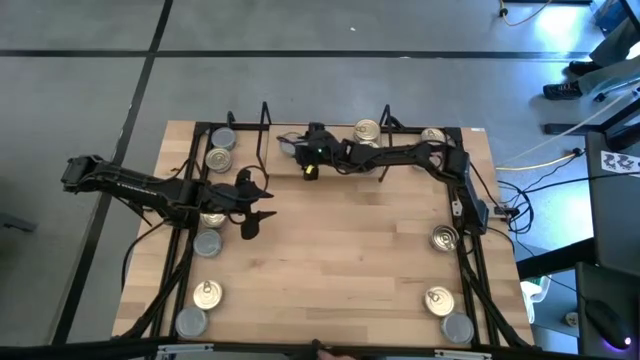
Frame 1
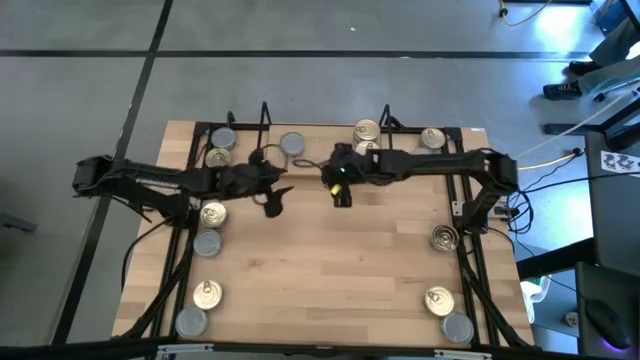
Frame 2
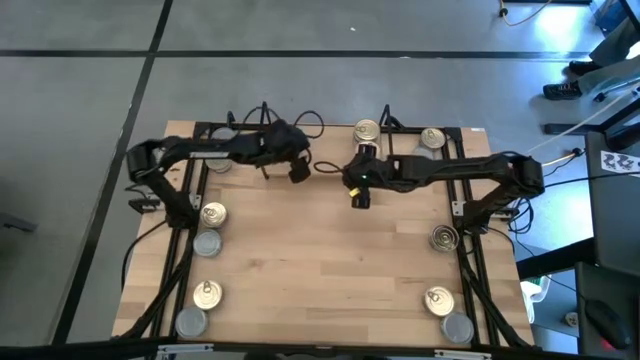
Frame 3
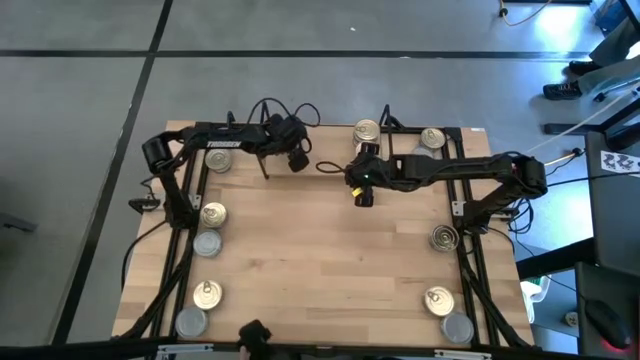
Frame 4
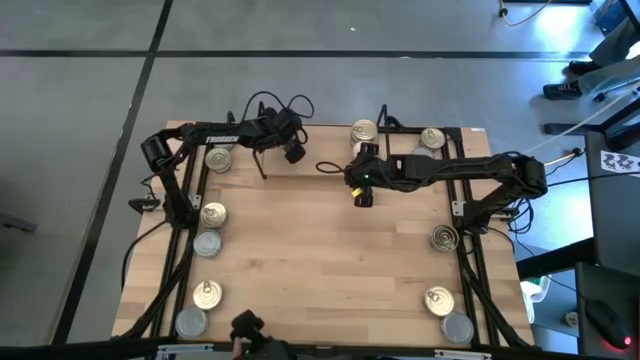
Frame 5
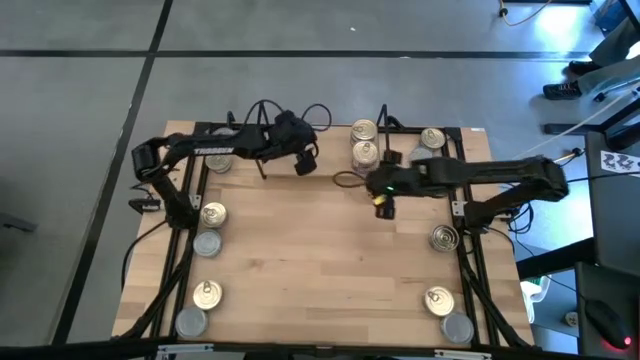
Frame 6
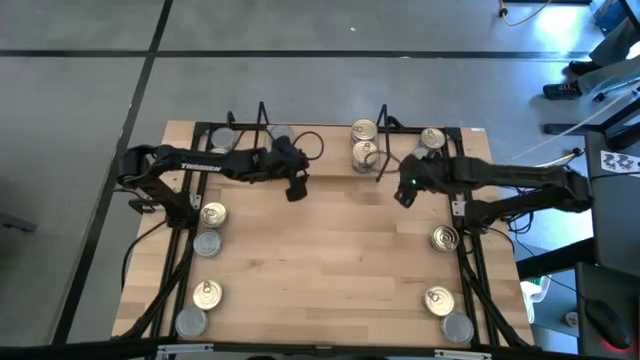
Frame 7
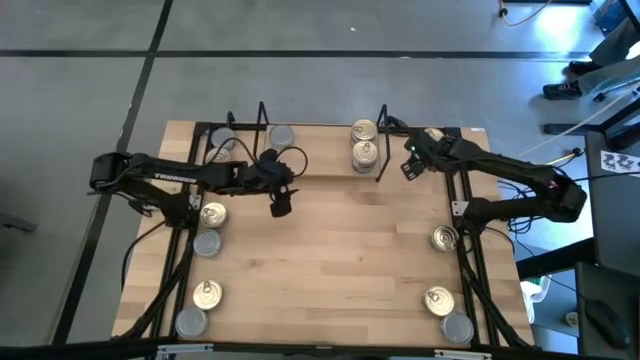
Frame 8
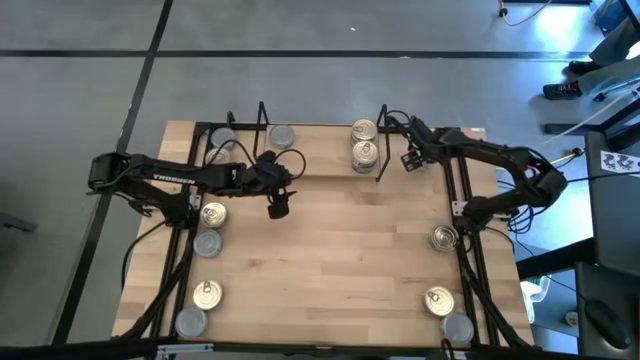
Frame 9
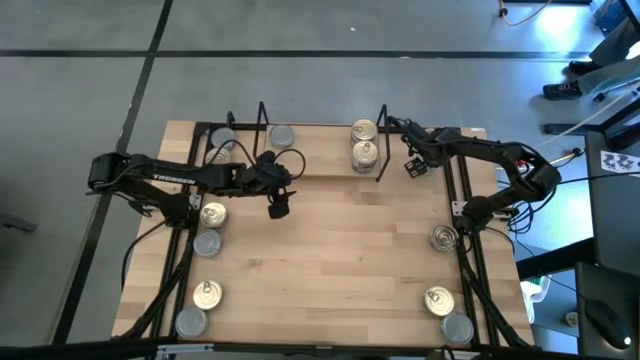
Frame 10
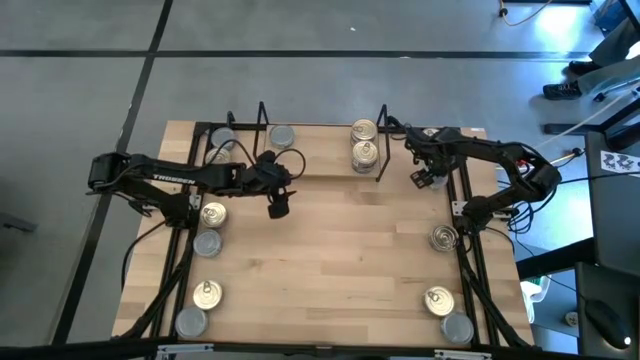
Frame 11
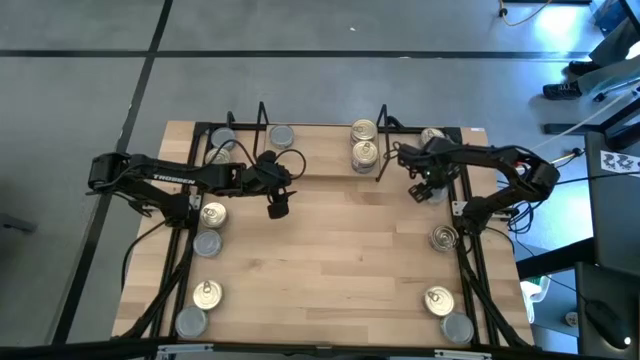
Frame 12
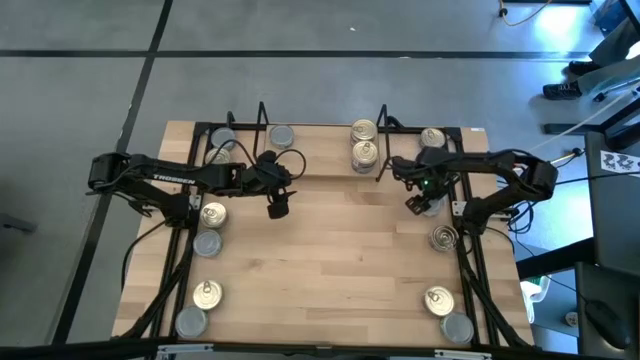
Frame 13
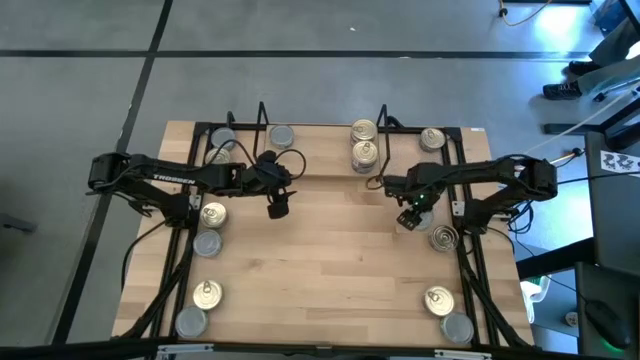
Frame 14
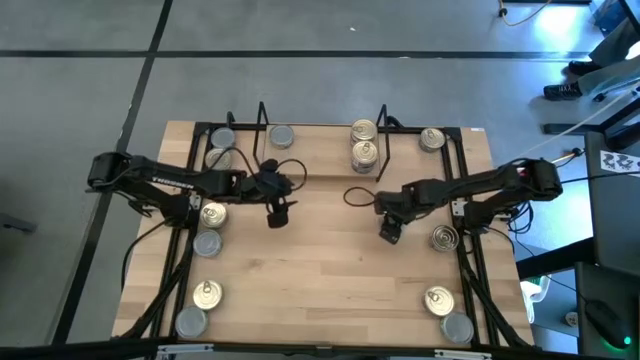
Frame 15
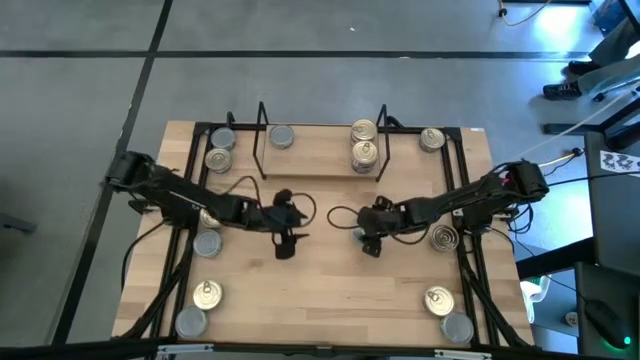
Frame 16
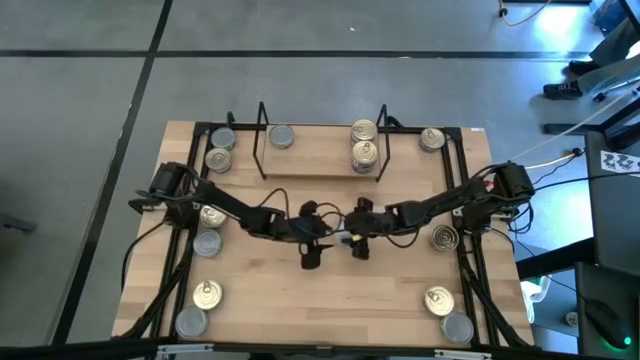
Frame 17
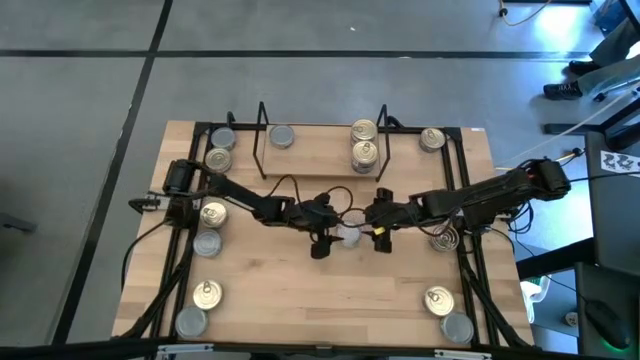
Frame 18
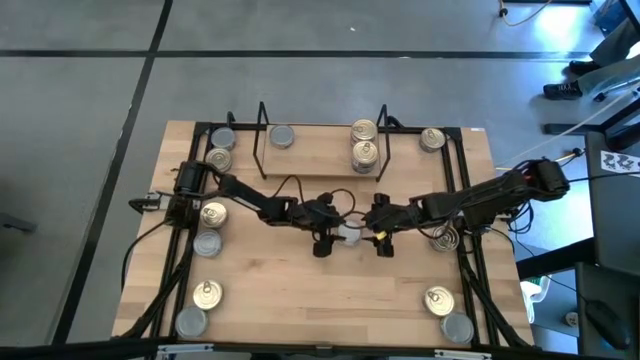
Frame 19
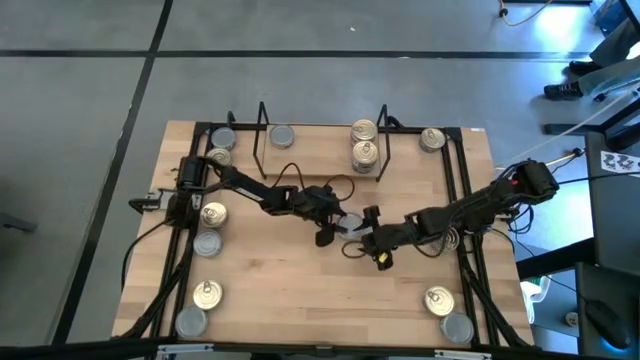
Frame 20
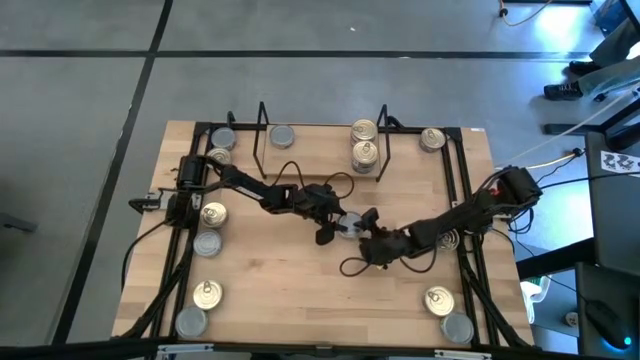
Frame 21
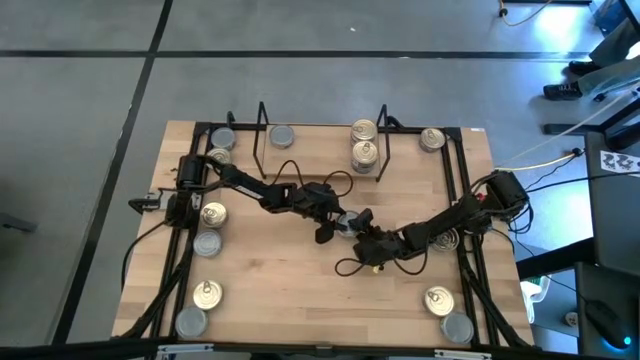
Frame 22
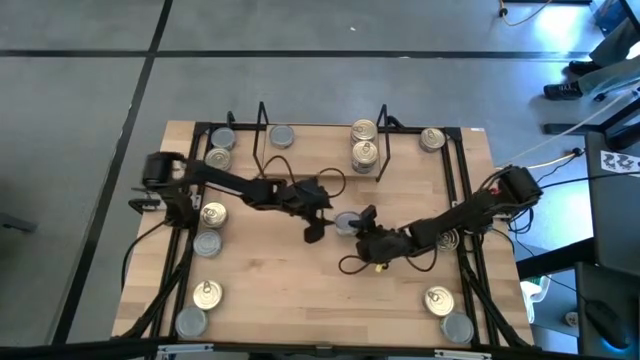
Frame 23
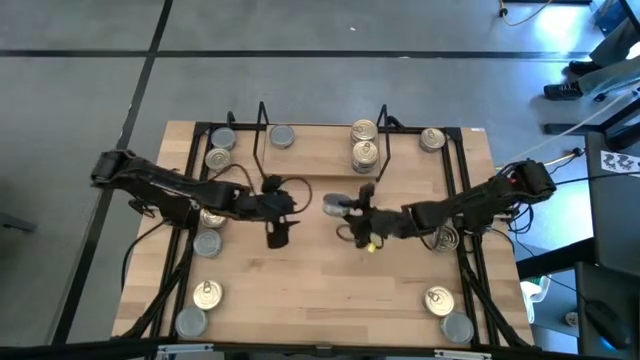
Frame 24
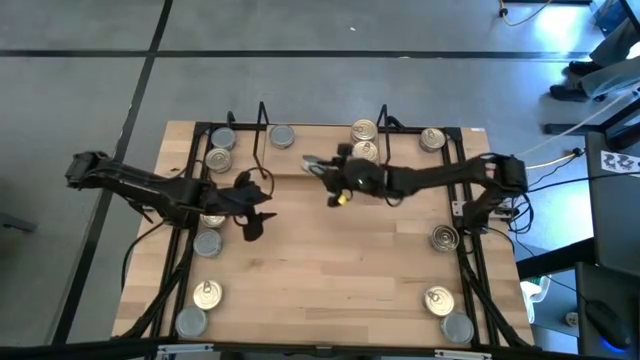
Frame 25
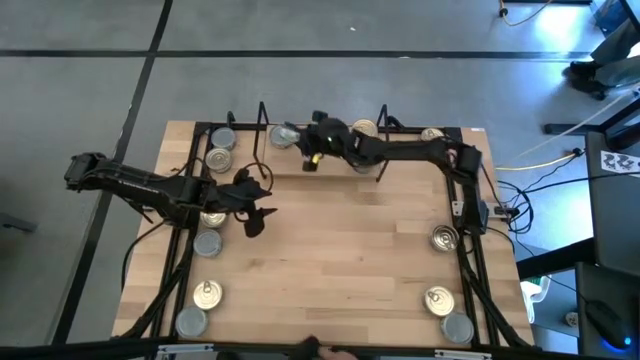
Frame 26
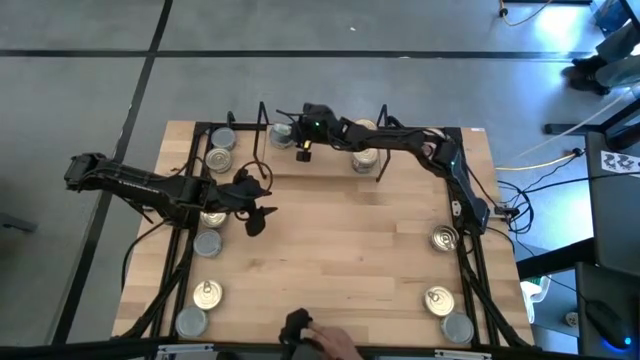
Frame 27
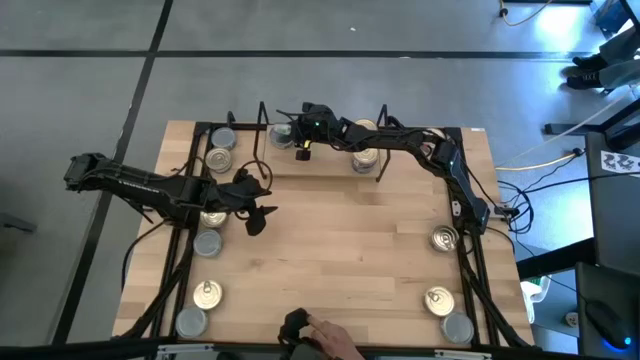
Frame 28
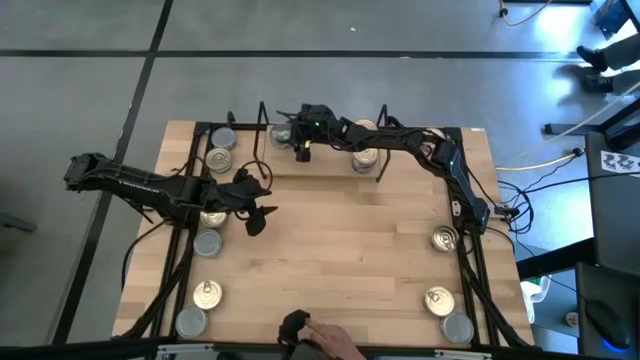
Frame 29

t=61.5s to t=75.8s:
Task: Stack canned seafood by type on shelf
Stack the green tuna can on top of the other green tuna can on the shelf

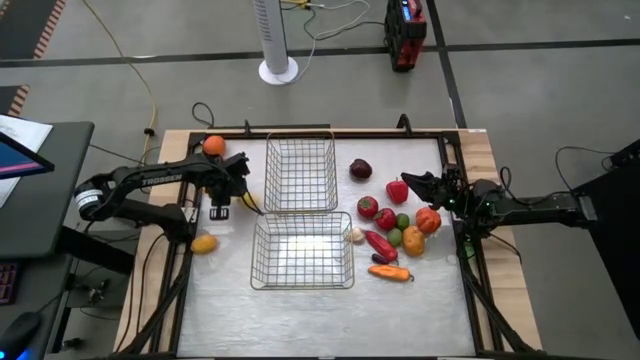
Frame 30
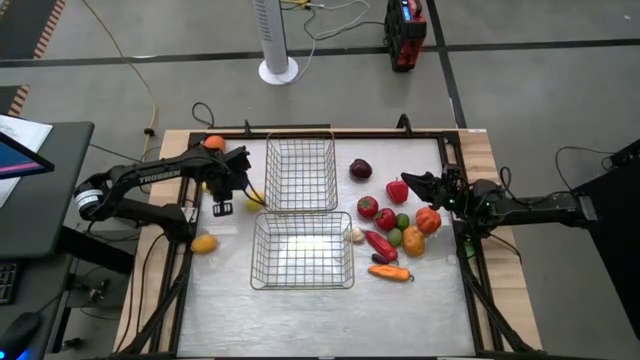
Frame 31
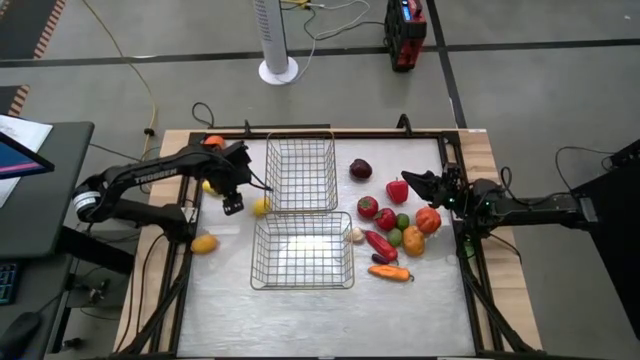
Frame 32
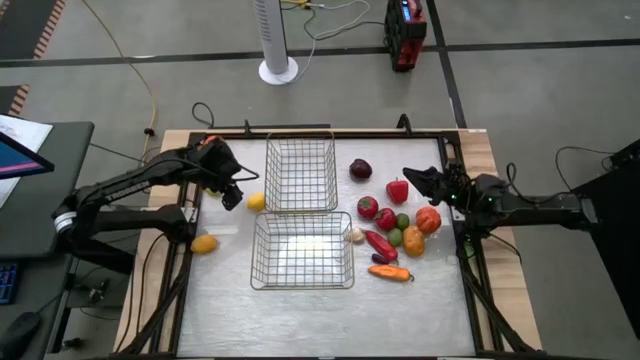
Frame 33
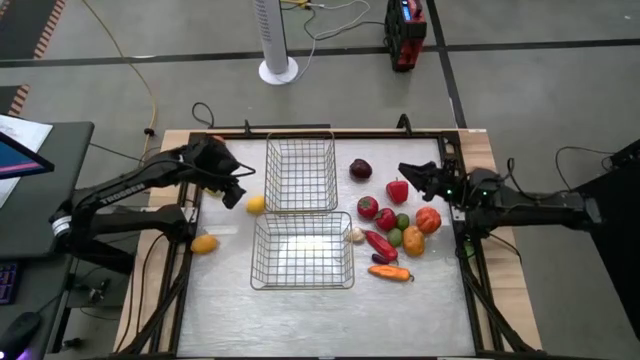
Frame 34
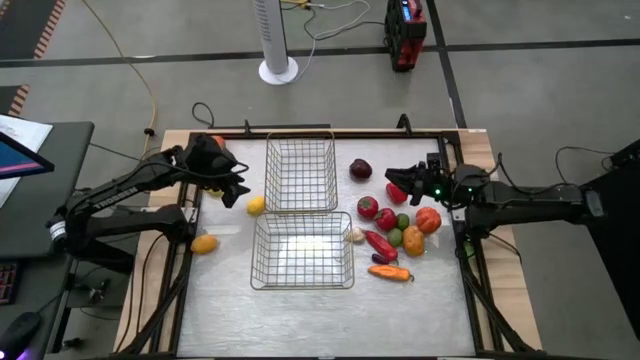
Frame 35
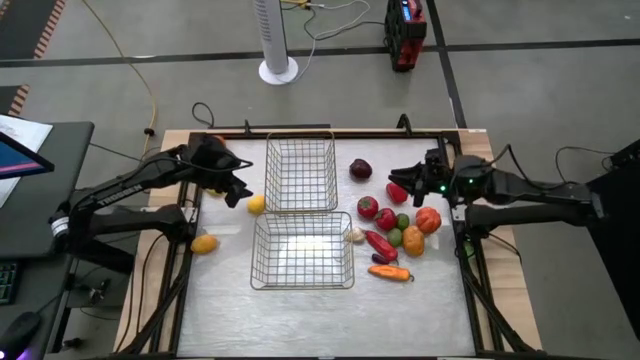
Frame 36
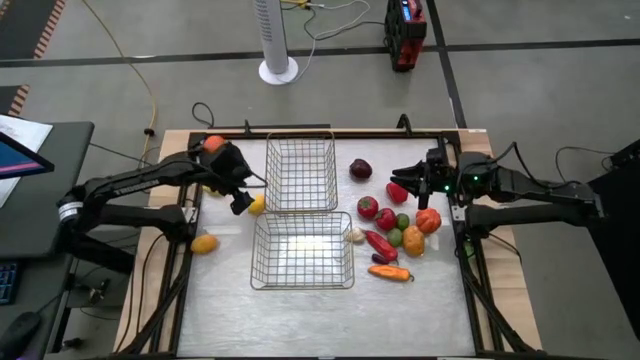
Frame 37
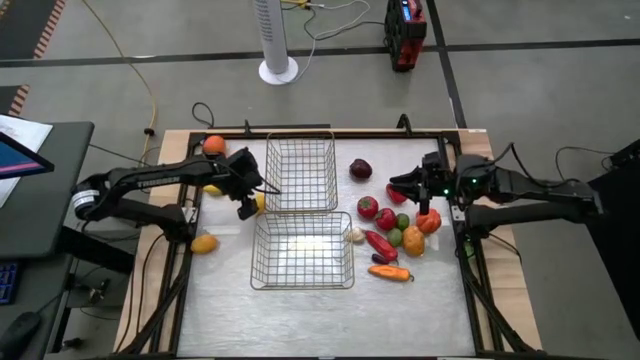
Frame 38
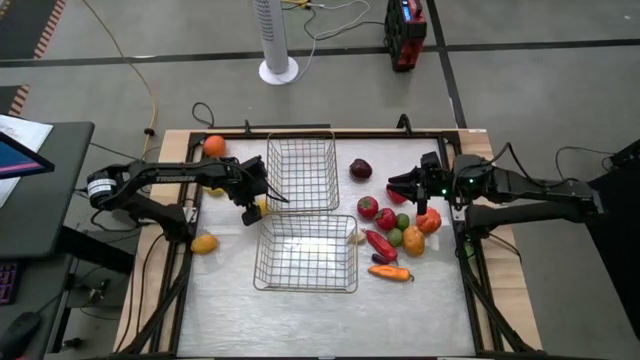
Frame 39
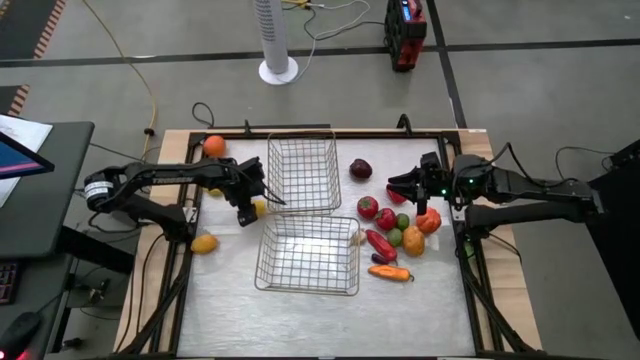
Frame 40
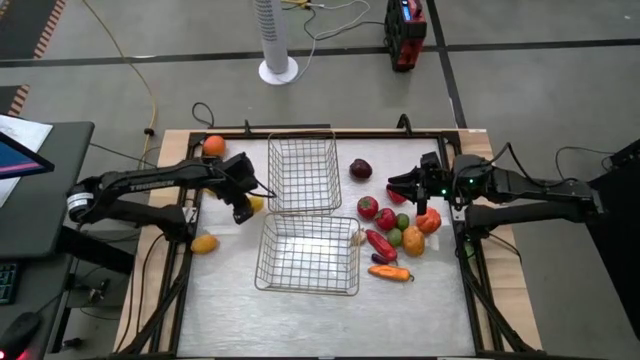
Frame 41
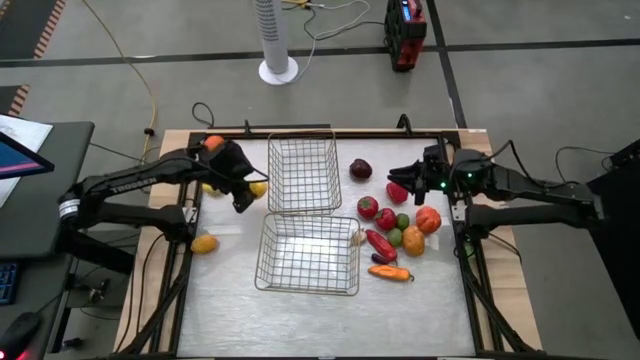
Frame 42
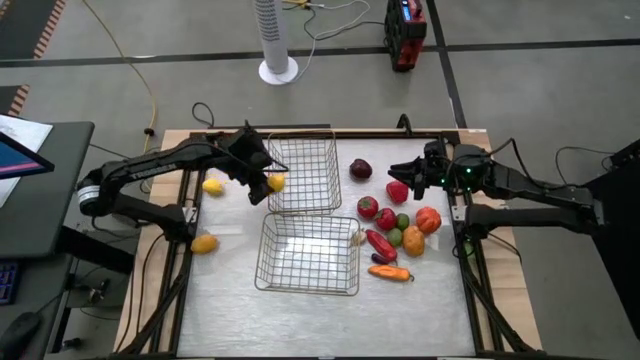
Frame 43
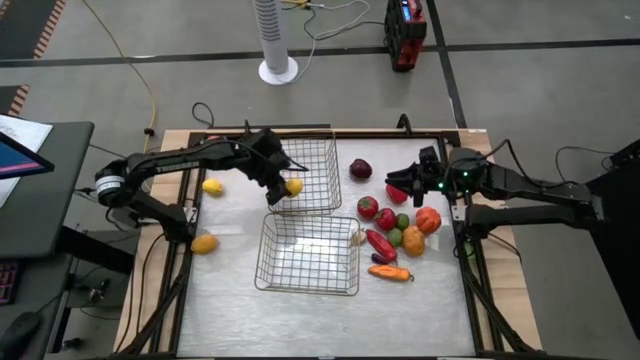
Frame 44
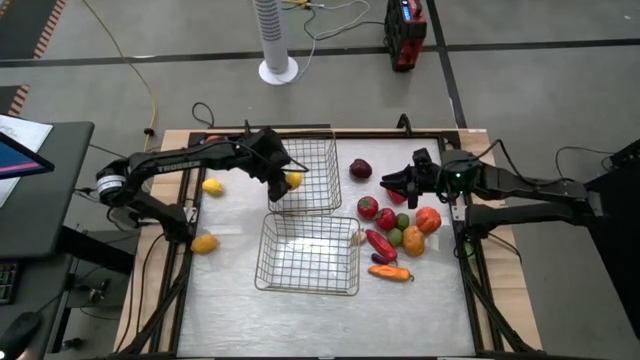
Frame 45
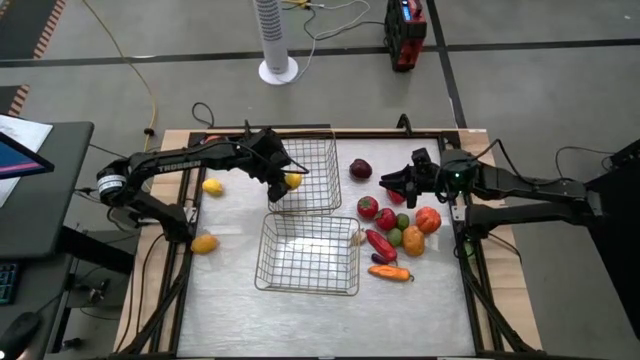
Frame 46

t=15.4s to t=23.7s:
Task: Sort produce into baskets
Put the right yellow lemon into the top wire basket
